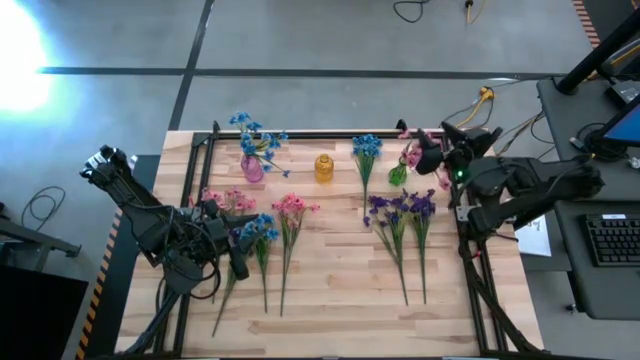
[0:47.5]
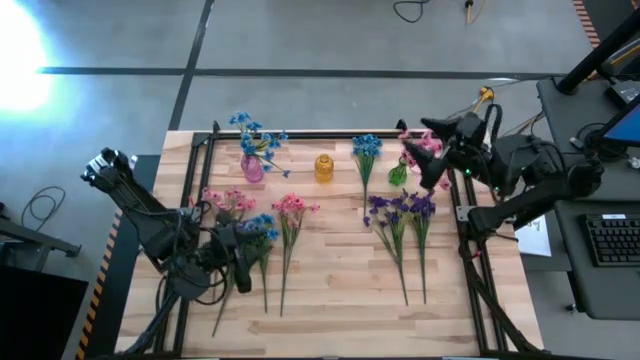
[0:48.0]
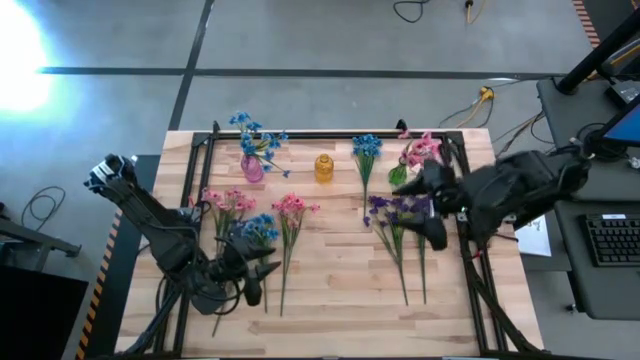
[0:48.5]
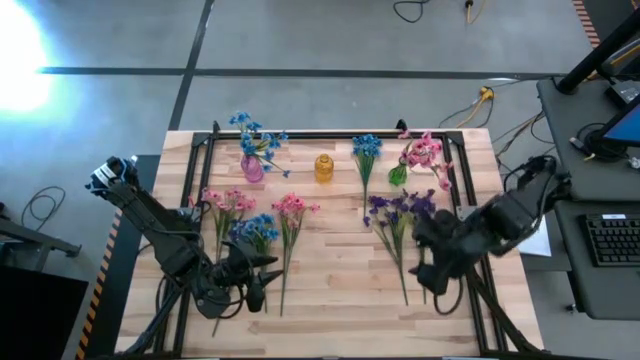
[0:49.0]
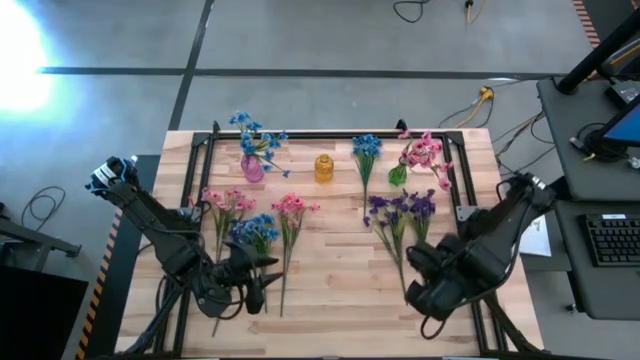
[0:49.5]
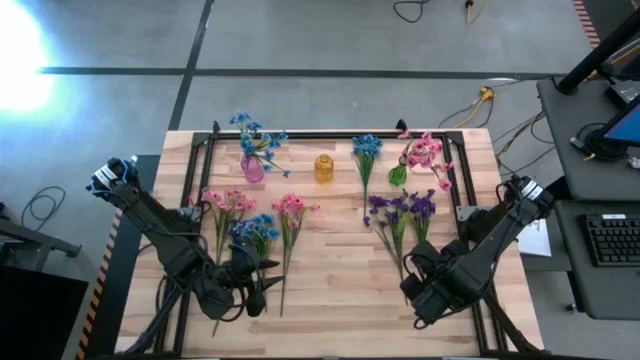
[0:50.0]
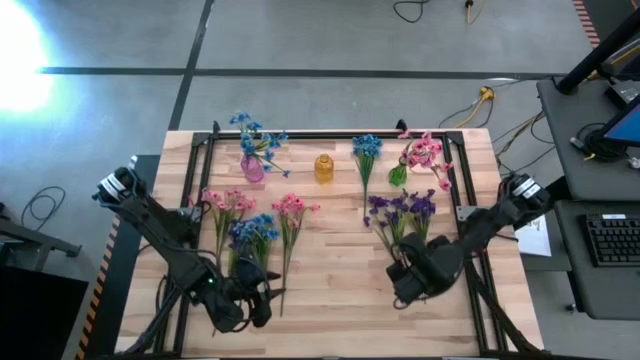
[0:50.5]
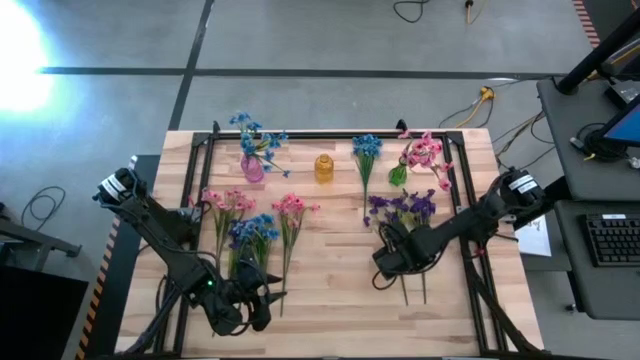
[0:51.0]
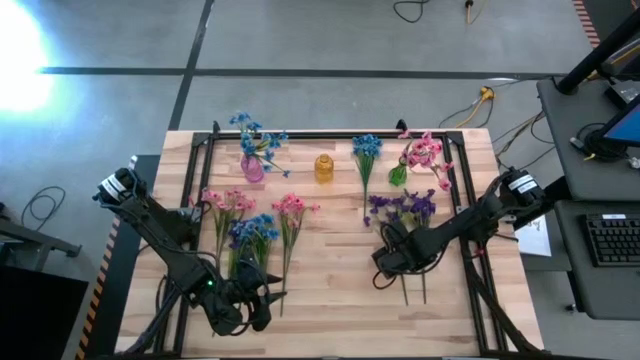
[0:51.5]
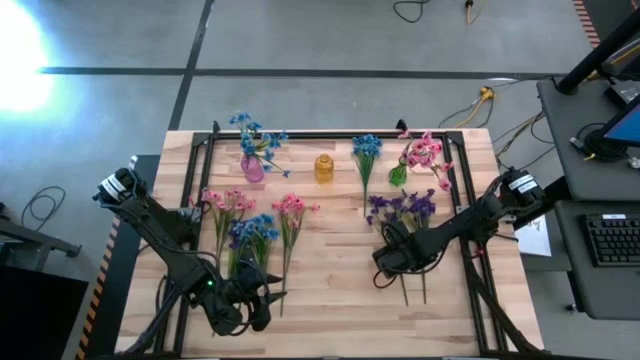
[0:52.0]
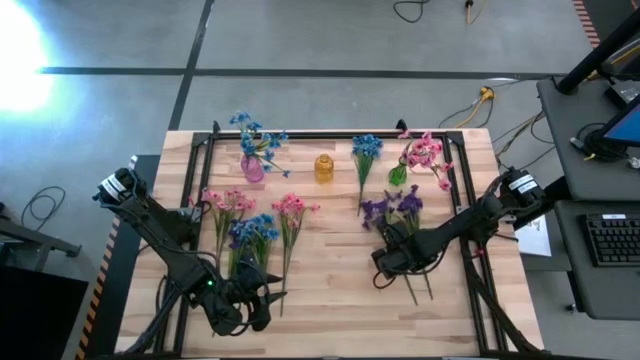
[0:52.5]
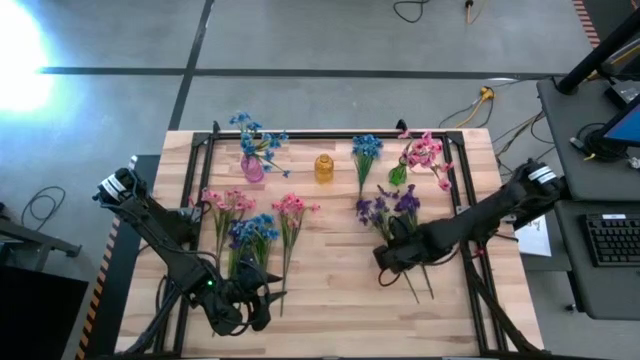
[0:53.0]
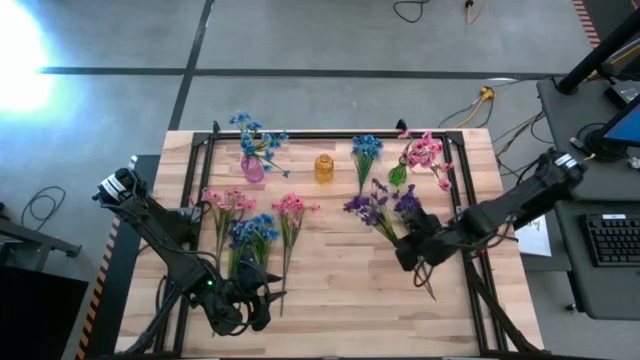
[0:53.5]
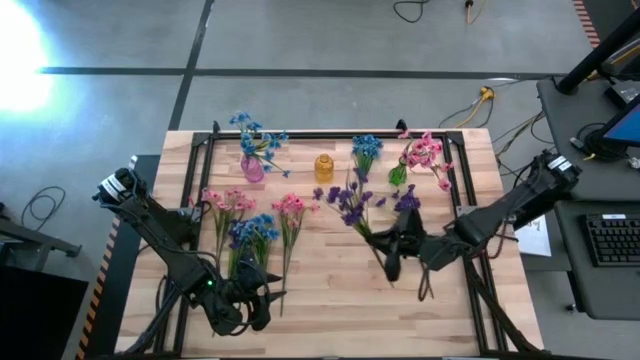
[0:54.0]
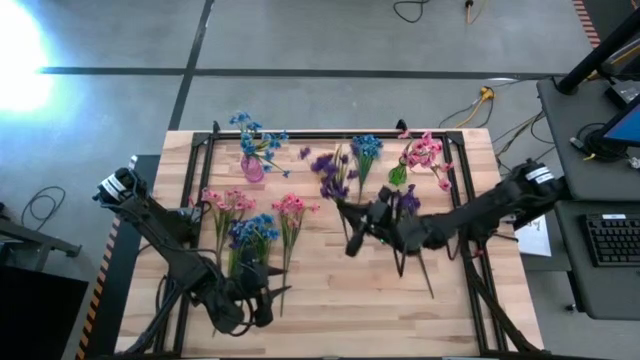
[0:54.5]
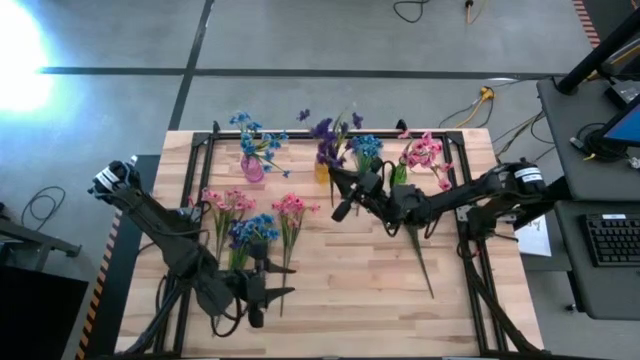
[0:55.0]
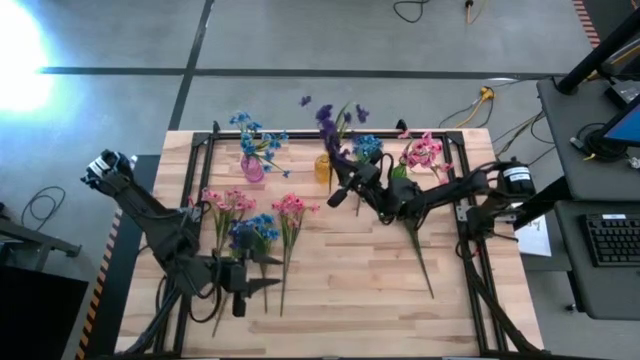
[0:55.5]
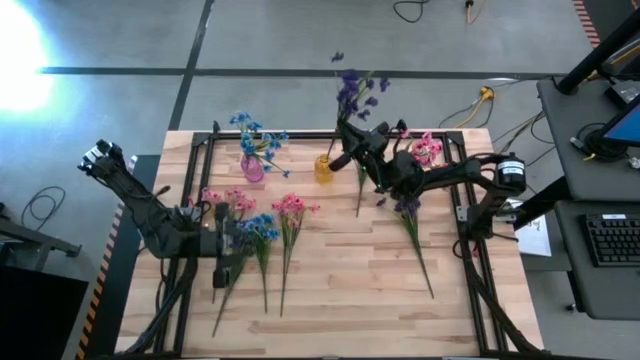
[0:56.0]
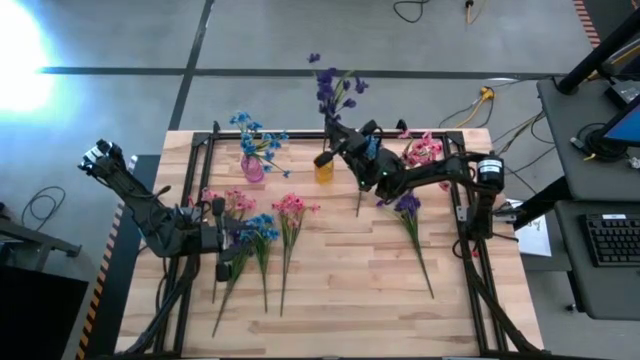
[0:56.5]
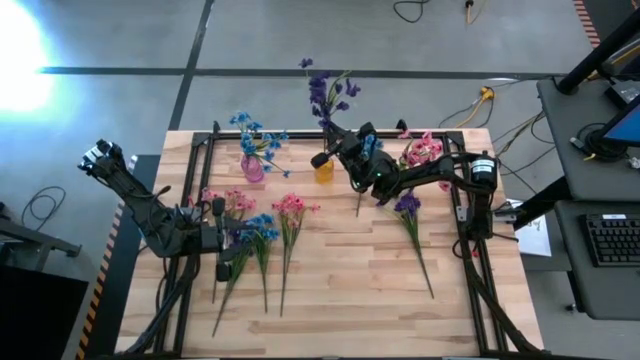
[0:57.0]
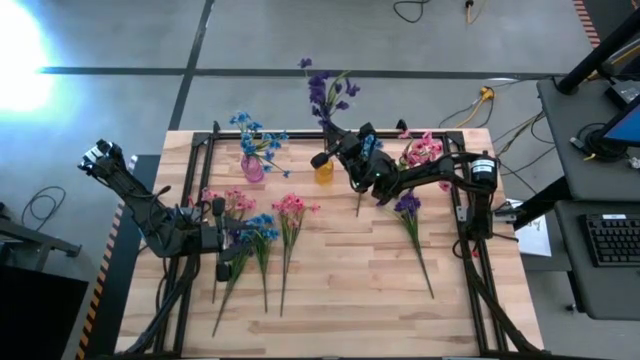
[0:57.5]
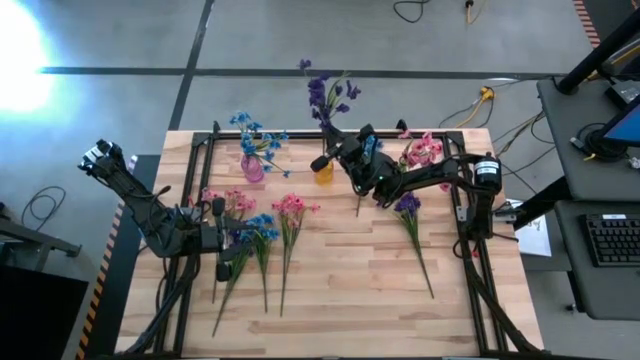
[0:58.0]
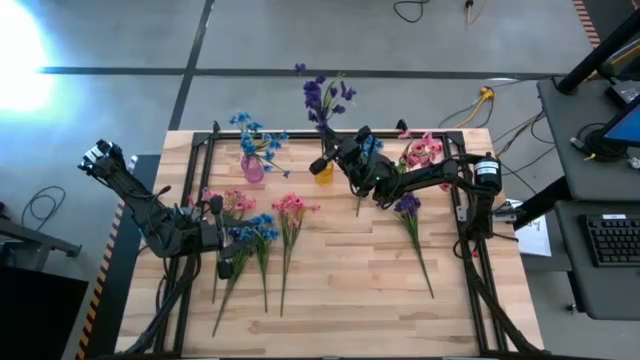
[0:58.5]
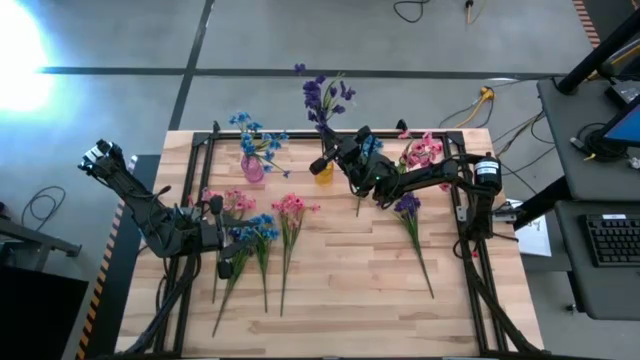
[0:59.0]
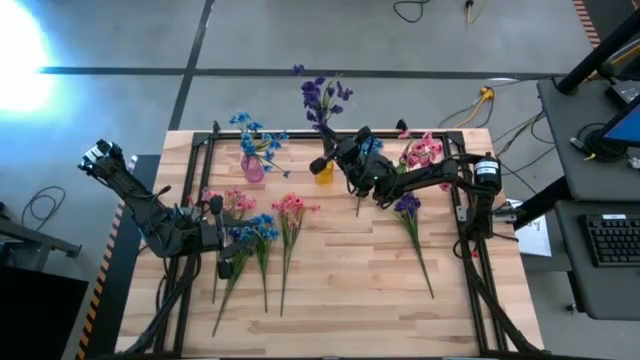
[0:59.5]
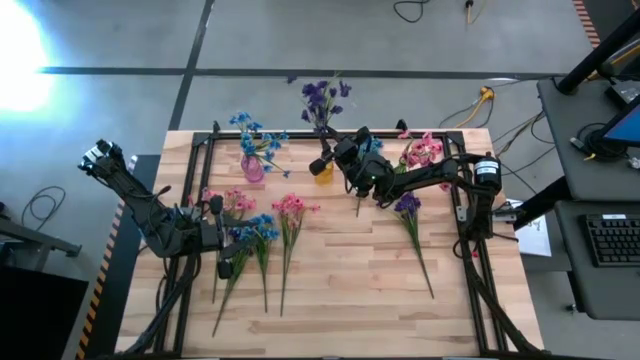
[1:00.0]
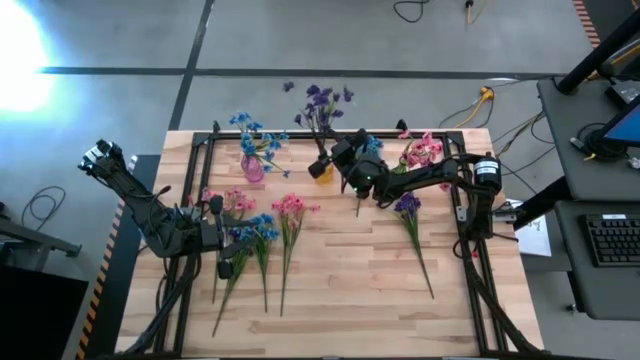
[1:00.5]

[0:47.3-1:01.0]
Task: Sort flowers into vase by color
Put the middle violet flowers into the yellow vase

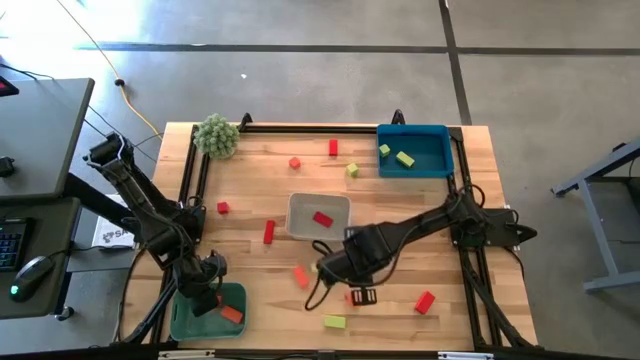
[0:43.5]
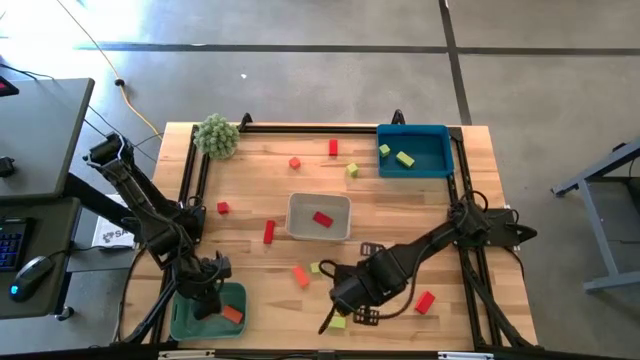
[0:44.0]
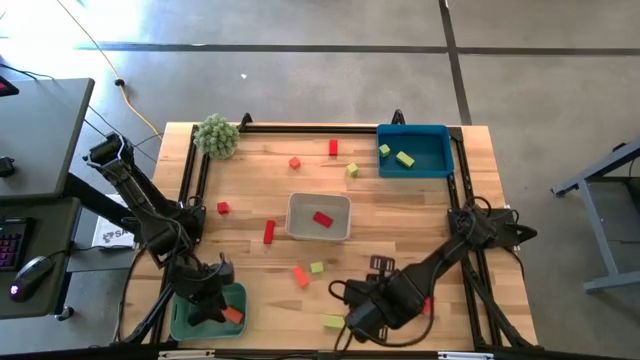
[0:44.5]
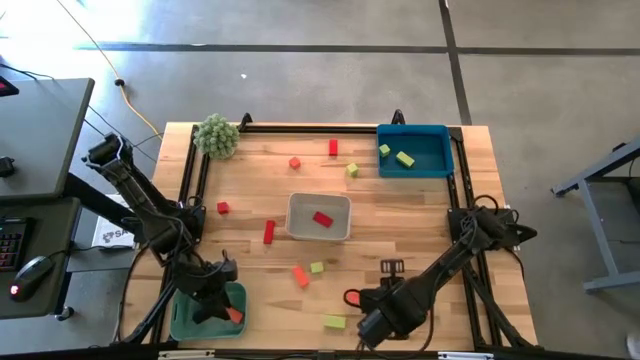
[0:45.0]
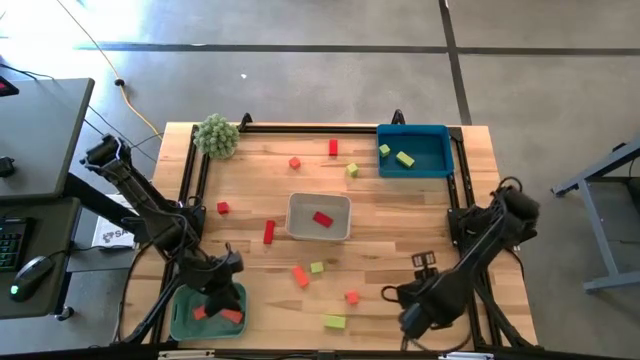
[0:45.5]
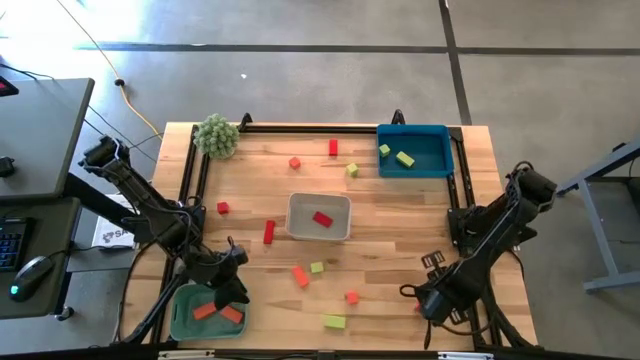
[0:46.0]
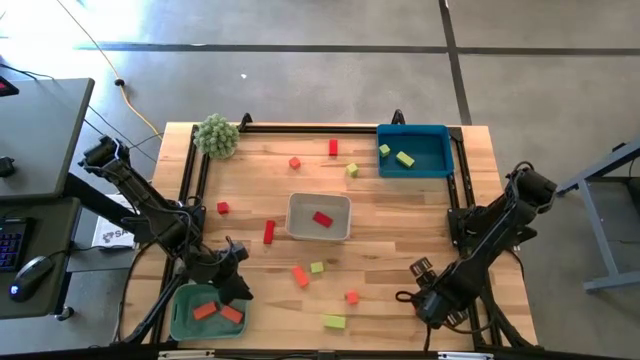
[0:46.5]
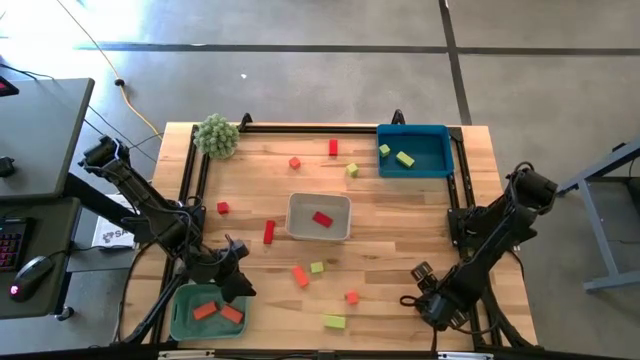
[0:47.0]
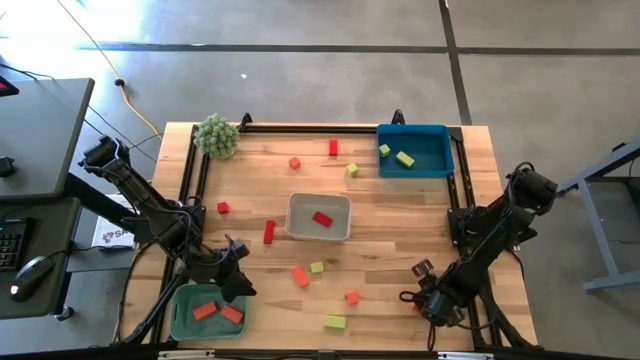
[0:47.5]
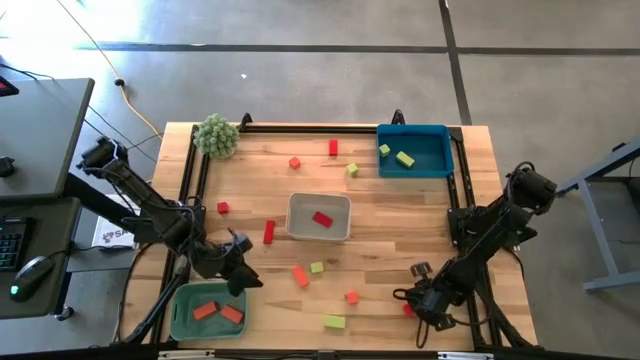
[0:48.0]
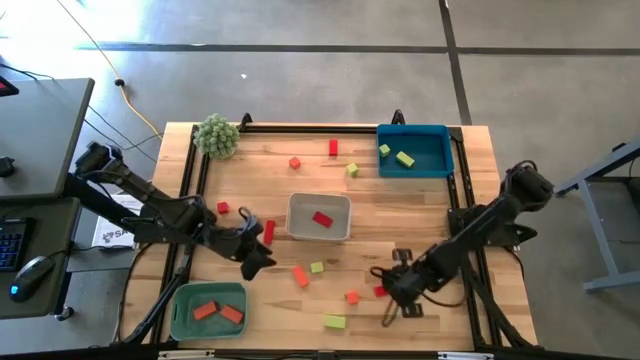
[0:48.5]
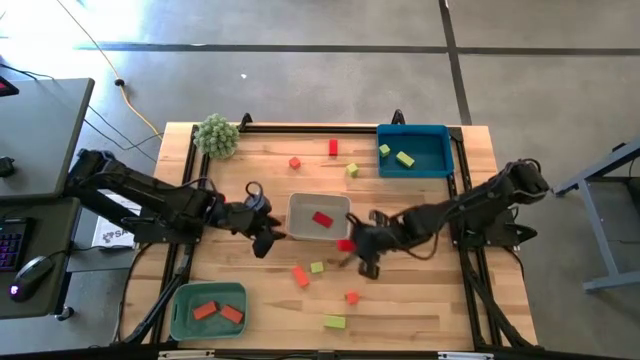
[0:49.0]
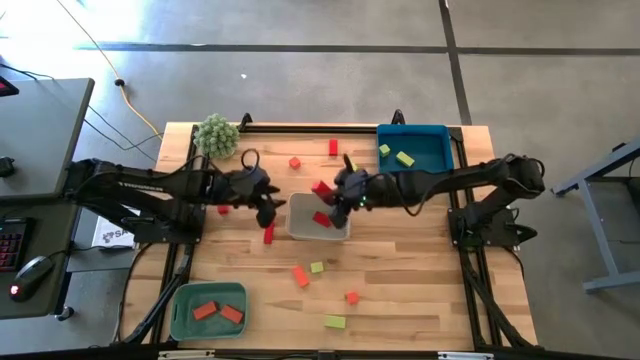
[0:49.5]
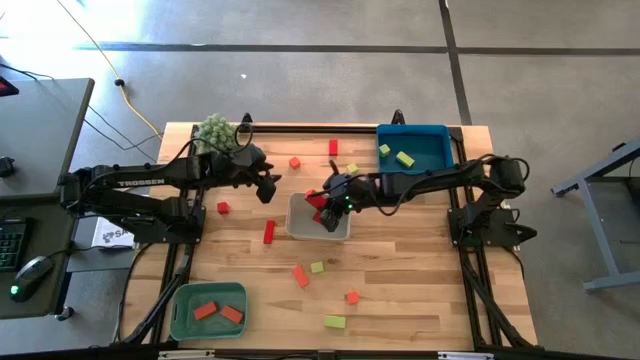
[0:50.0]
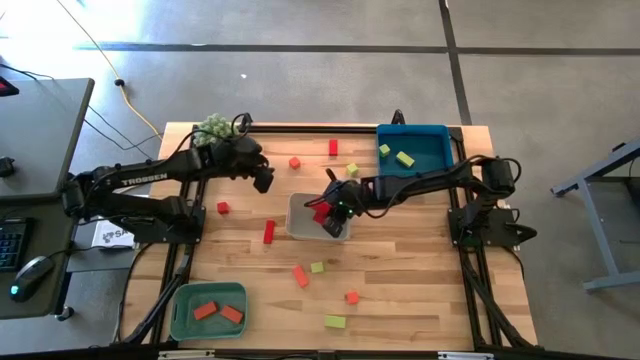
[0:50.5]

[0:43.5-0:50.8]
Task: Sort & place blocks by color
Put the red wooden block into the white bin
